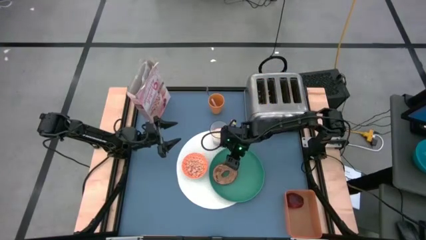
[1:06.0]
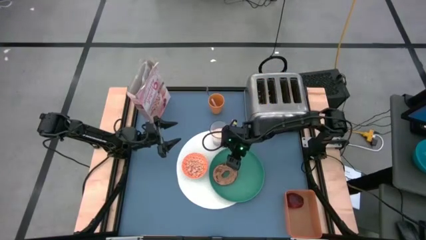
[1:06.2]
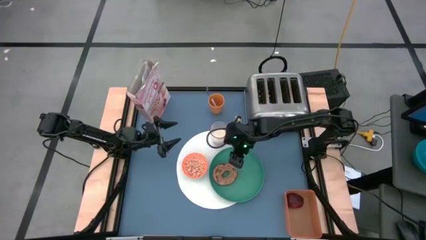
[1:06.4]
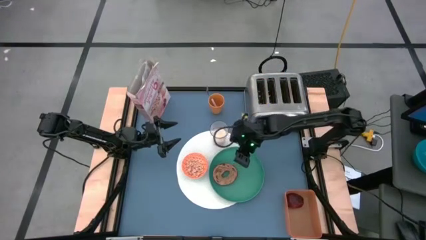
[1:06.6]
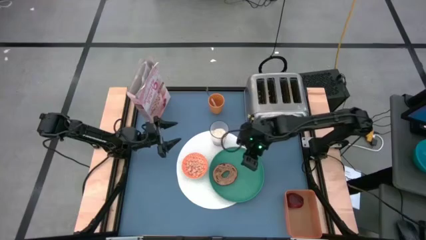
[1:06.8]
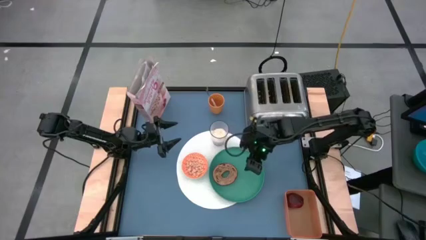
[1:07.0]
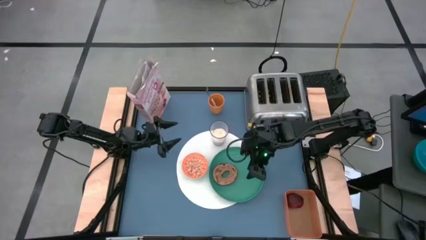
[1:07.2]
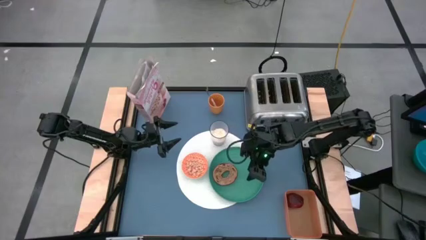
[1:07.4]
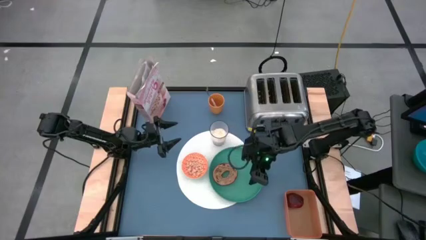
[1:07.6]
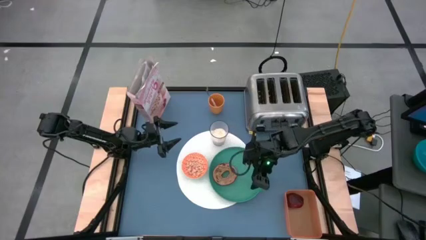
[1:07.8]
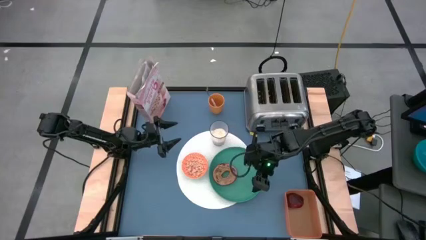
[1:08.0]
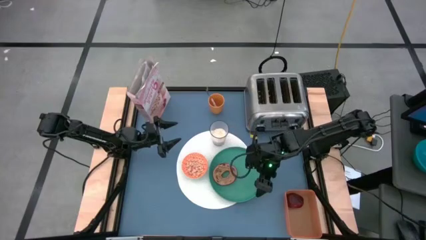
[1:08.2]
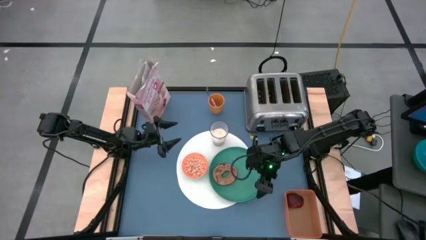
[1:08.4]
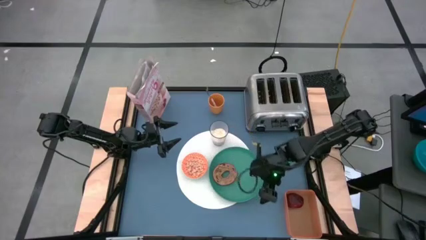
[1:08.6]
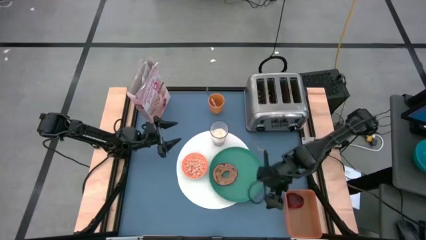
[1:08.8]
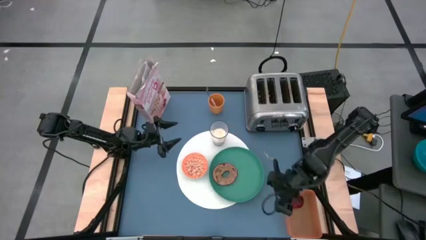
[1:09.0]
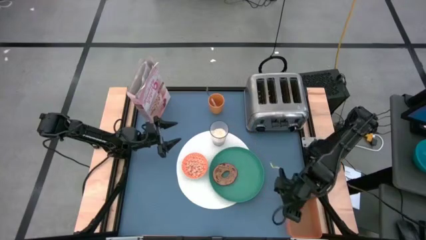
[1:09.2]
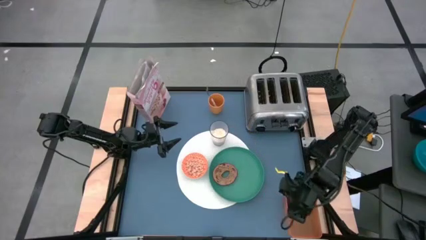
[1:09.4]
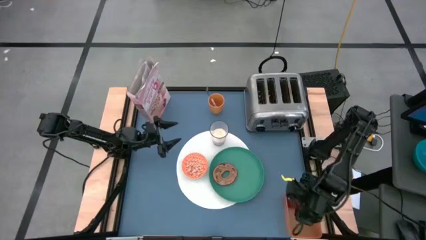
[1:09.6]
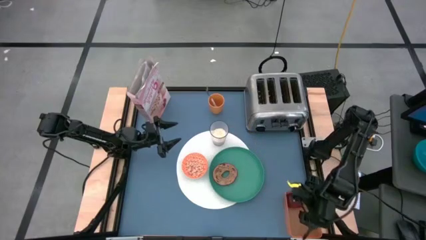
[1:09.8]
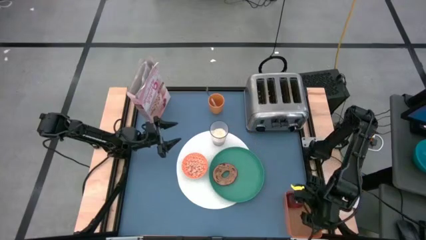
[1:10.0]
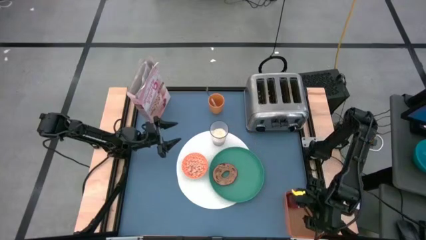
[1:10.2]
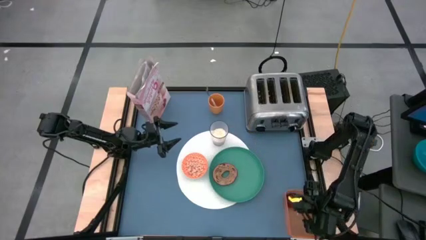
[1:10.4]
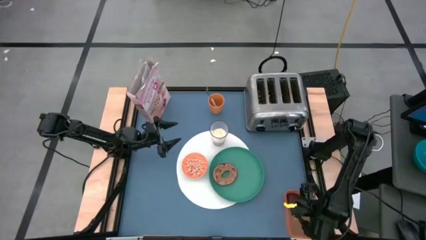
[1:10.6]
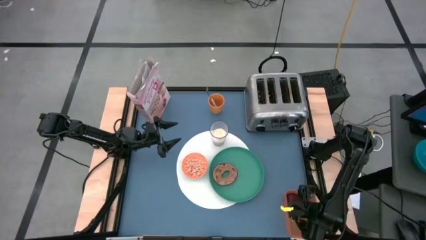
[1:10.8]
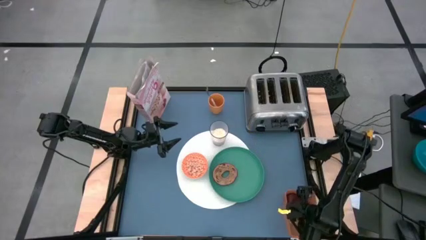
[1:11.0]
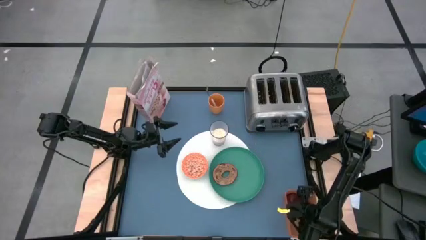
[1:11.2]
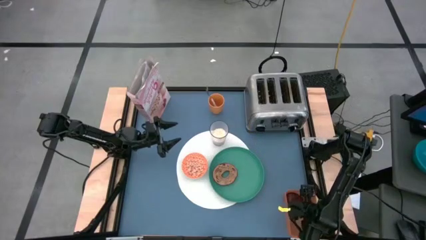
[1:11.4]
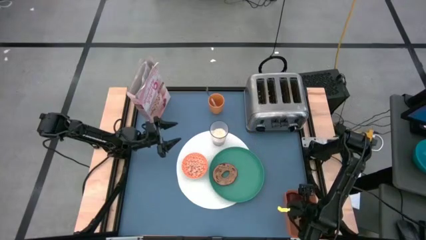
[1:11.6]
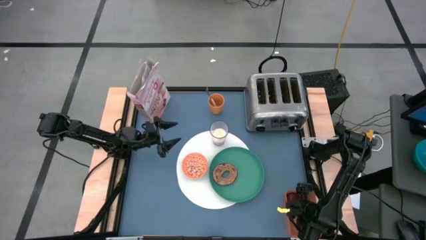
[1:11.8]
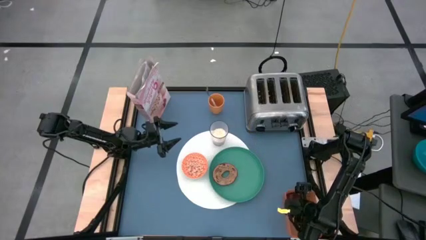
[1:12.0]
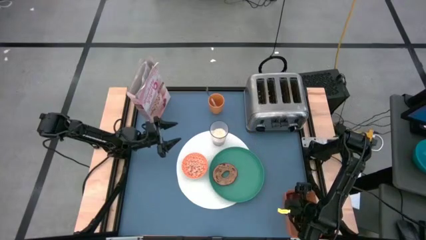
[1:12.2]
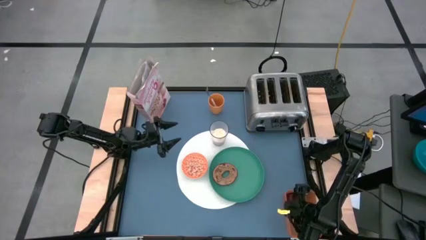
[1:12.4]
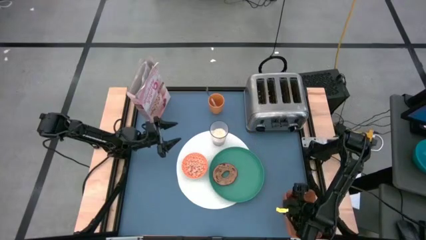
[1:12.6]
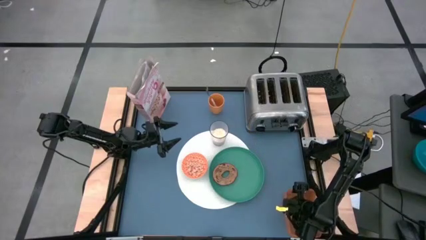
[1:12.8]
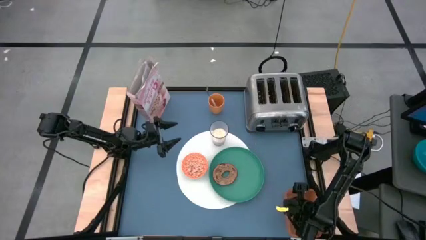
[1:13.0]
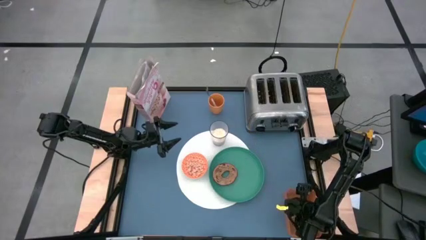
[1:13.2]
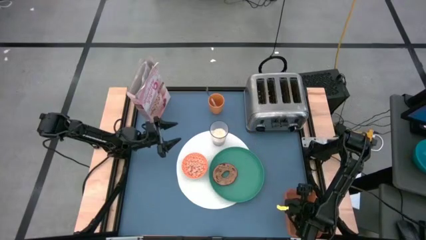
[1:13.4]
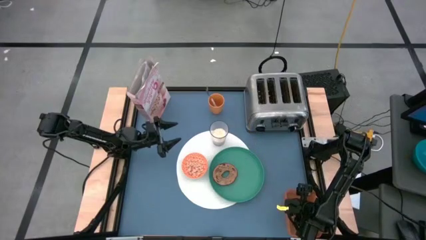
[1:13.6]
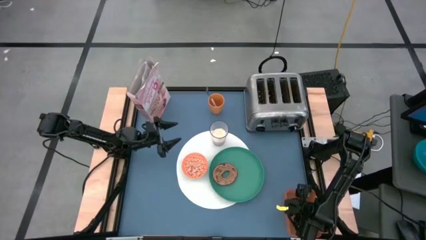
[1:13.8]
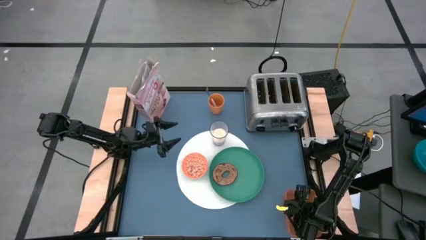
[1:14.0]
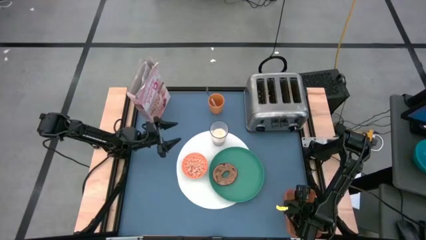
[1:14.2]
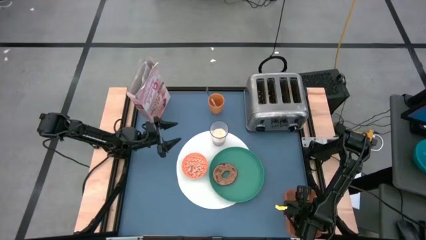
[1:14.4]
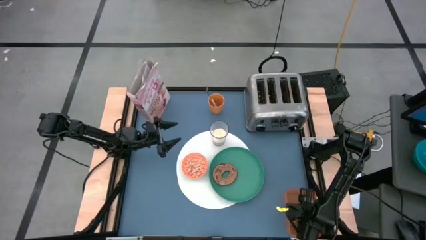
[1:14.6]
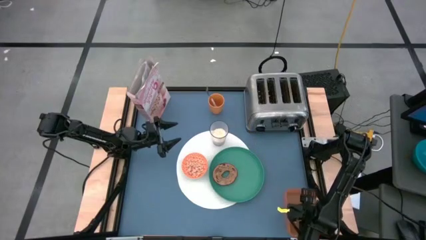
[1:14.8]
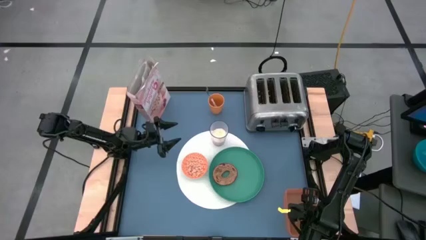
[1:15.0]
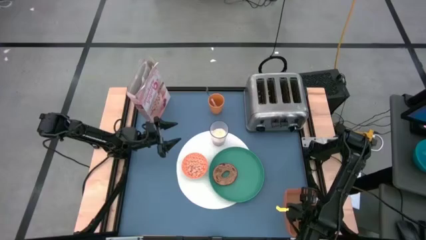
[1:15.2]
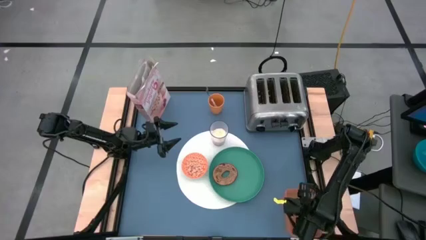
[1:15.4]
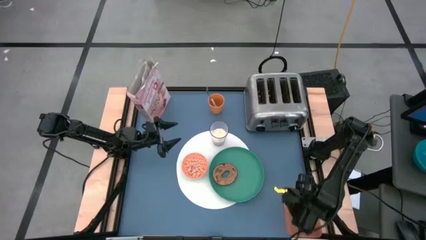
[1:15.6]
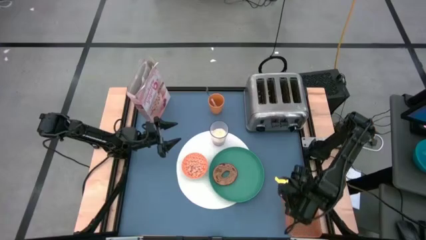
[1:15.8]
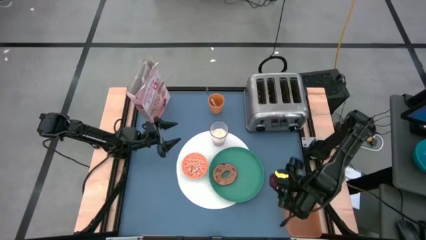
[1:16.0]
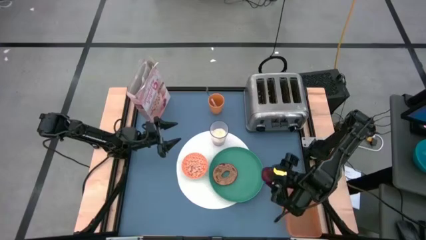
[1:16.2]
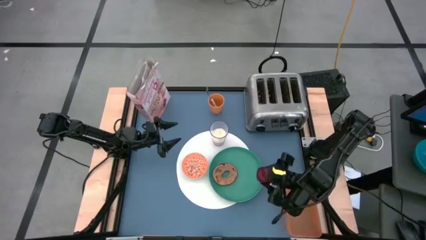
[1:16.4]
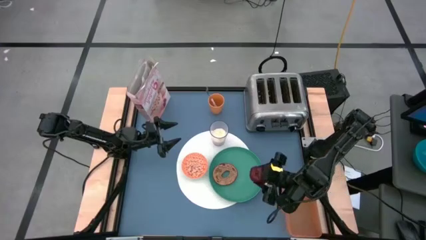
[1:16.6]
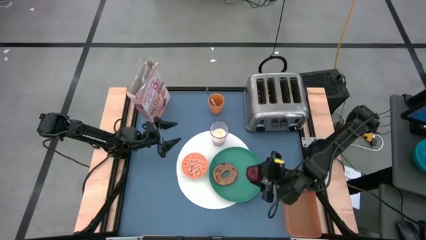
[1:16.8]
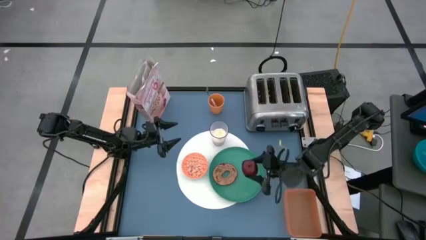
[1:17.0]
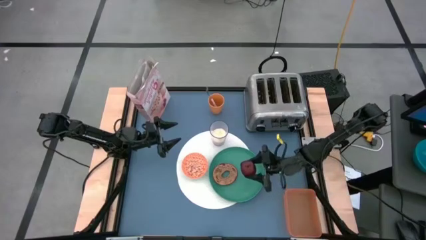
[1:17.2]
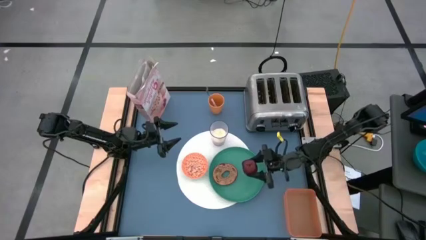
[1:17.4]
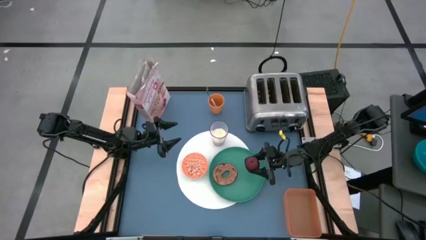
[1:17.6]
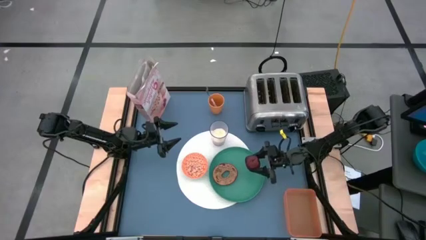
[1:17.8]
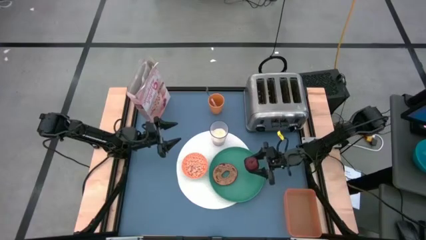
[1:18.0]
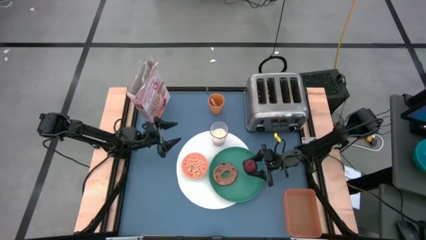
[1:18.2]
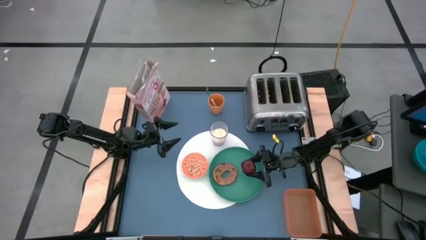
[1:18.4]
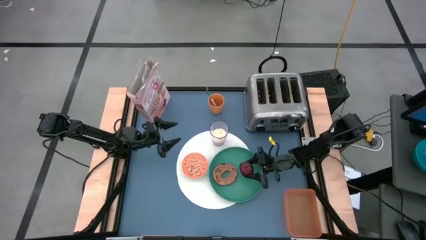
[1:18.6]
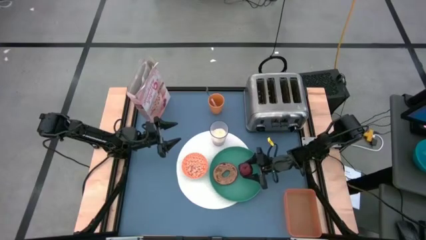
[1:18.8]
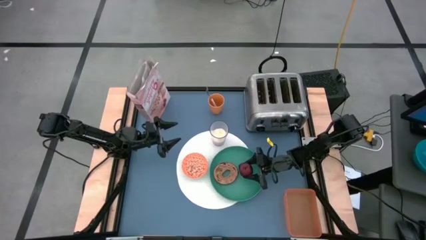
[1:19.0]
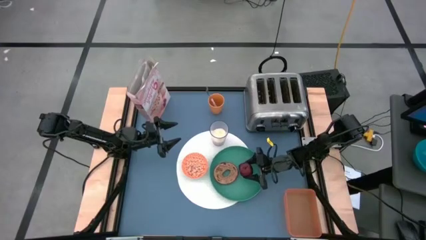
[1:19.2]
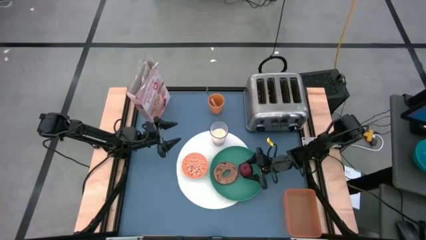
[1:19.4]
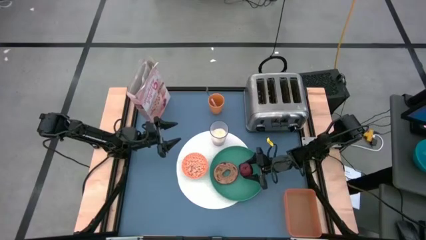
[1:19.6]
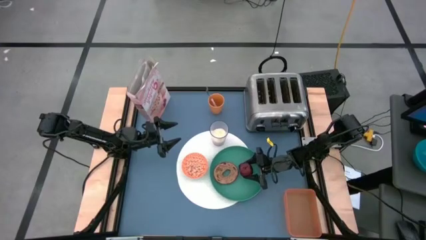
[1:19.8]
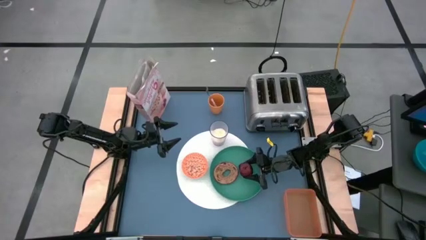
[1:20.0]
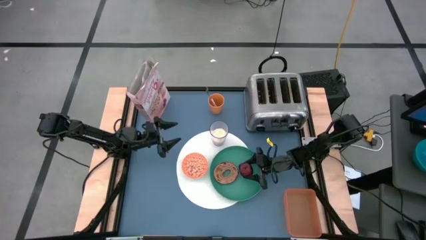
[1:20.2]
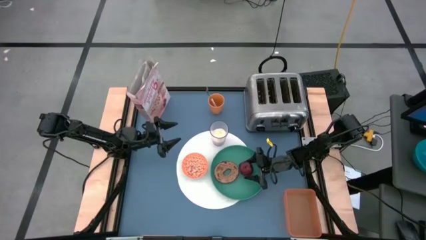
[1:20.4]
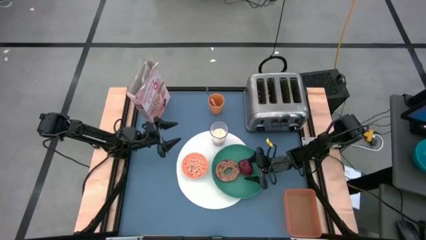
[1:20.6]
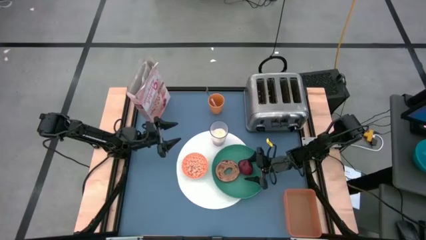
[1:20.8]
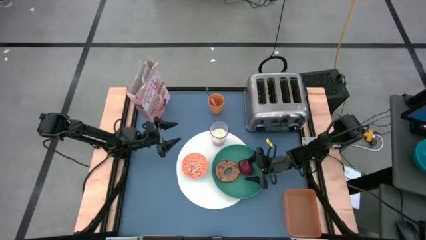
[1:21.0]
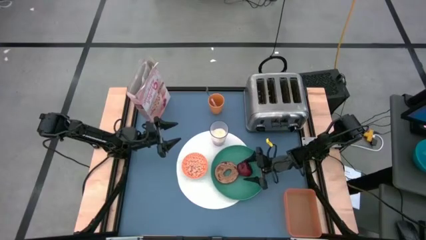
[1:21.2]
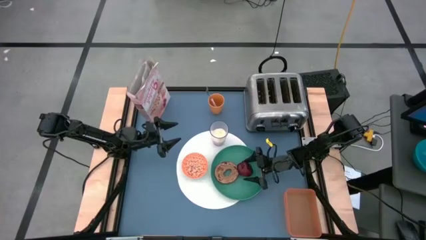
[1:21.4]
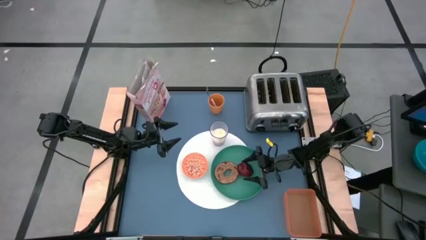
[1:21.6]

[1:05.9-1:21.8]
Task: Arrange a breakfast setting
Put the apple on the green plate

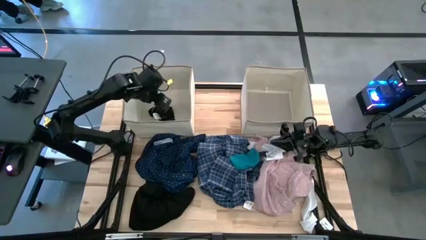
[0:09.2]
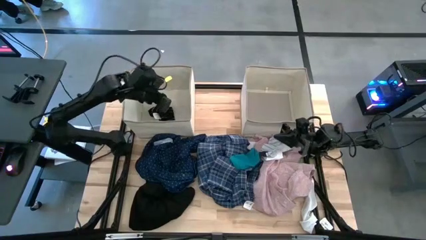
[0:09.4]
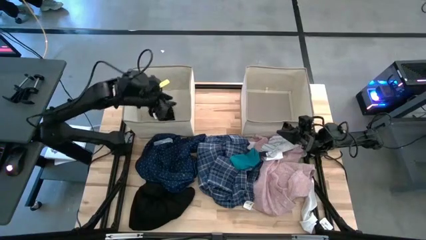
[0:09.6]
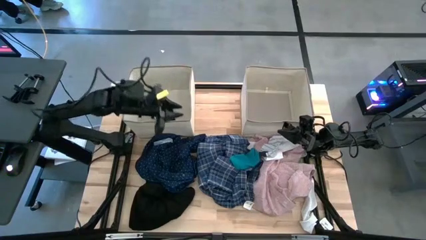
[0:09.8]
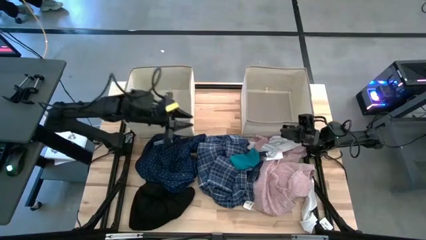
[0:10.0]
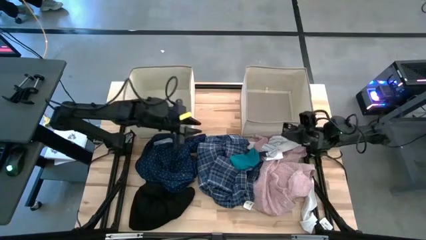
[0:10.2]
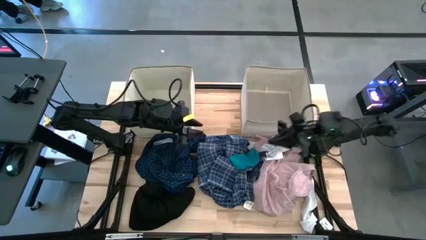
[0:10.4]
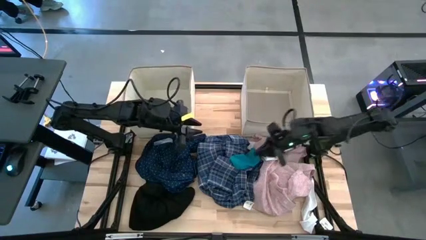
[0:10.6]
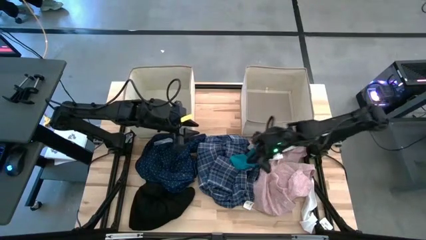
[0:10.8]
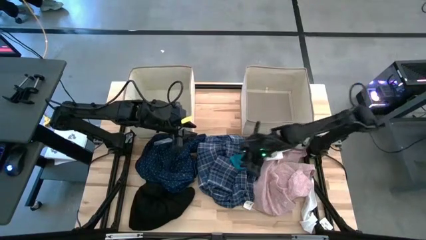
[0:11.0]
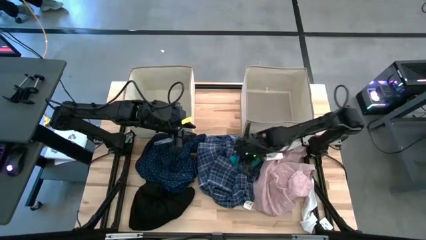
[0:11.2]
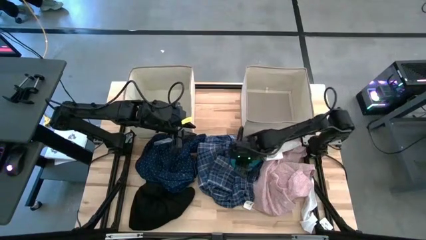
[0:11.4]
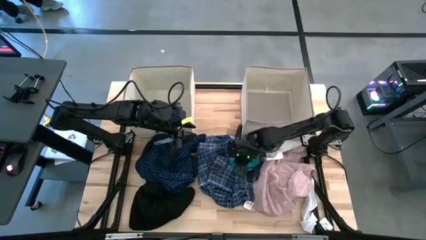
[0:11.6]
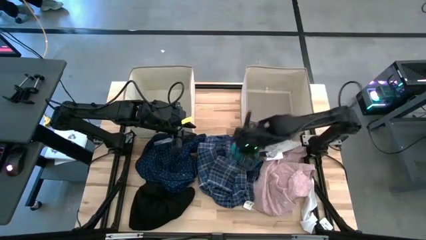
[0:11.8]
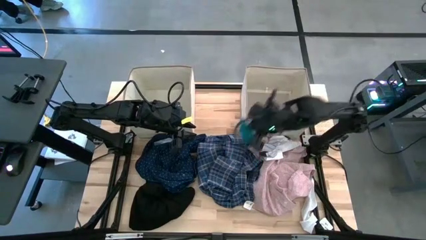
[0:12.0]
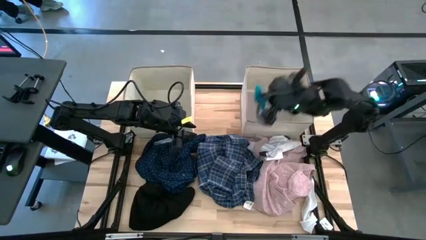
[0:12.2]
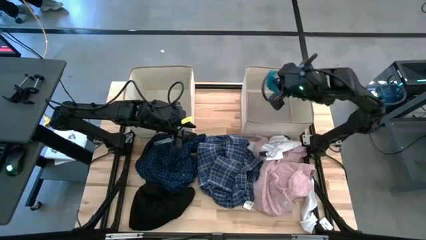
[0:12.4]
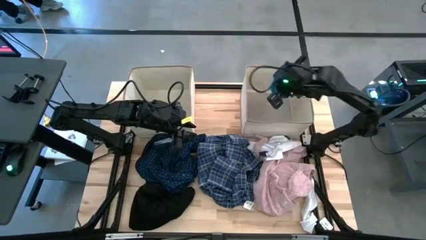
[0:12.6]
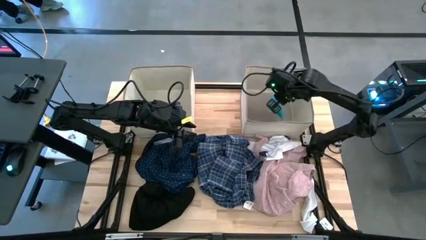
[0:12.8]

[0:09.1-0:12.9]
Task: Sort clothes
Put the blue sock into the right laundry bin
